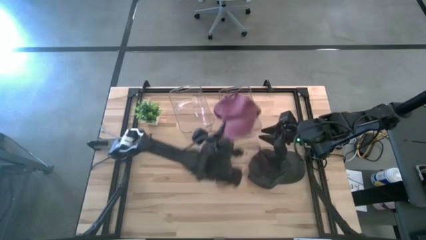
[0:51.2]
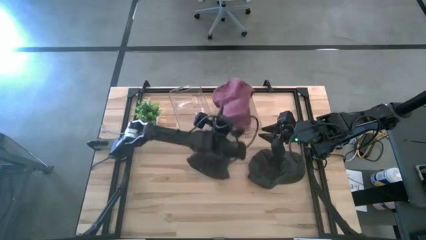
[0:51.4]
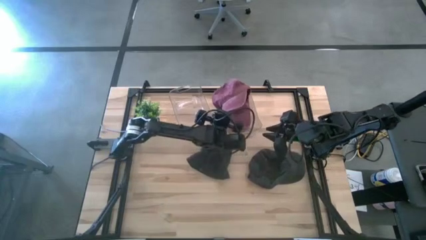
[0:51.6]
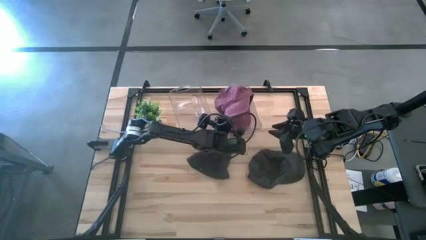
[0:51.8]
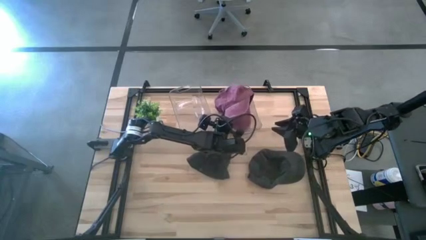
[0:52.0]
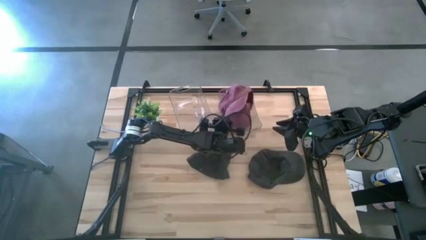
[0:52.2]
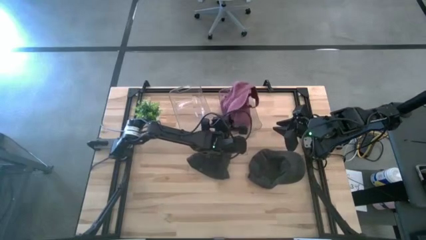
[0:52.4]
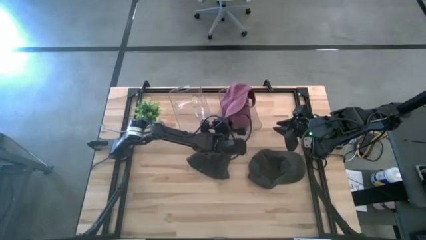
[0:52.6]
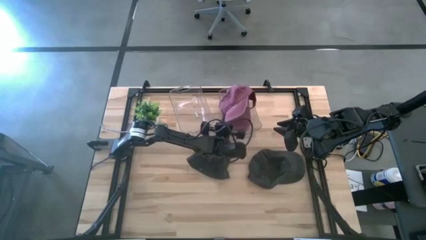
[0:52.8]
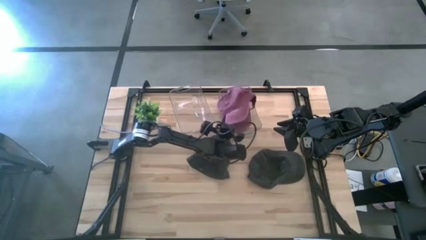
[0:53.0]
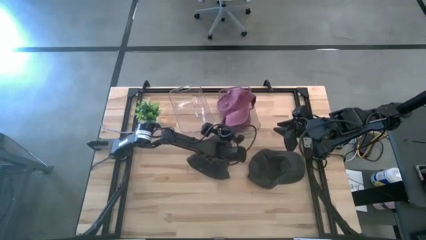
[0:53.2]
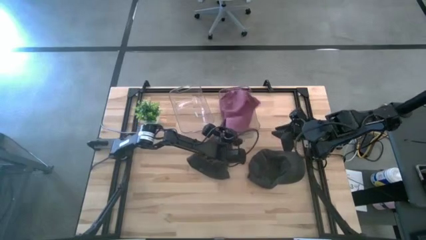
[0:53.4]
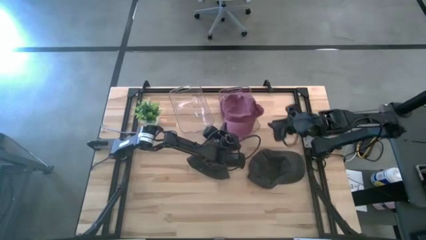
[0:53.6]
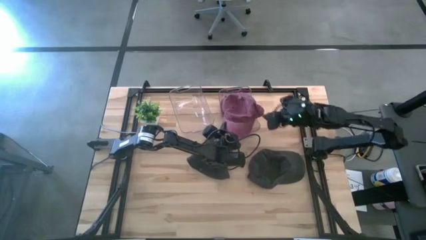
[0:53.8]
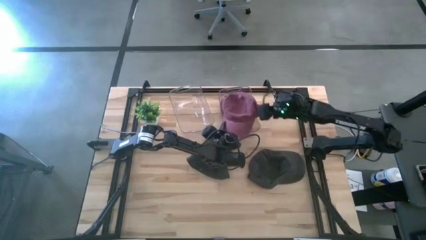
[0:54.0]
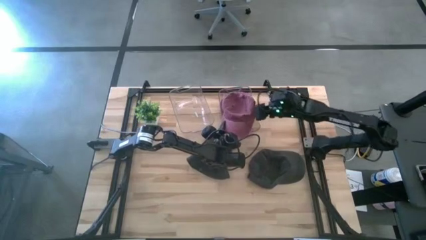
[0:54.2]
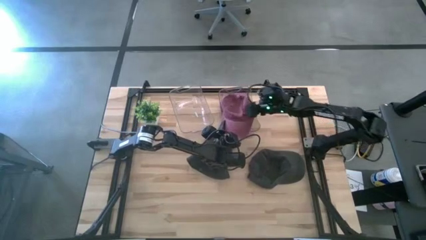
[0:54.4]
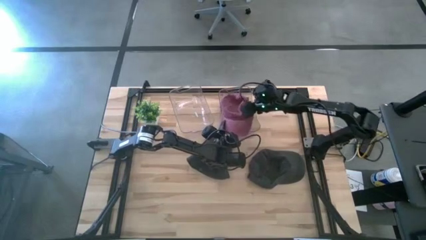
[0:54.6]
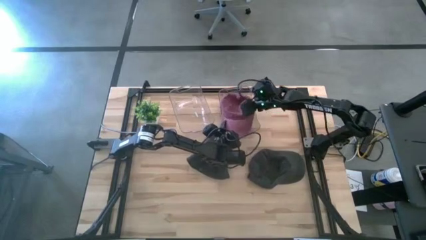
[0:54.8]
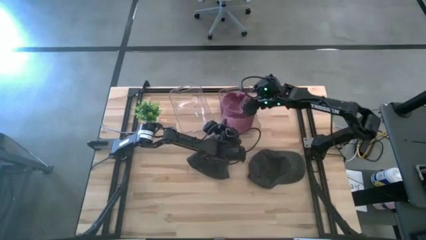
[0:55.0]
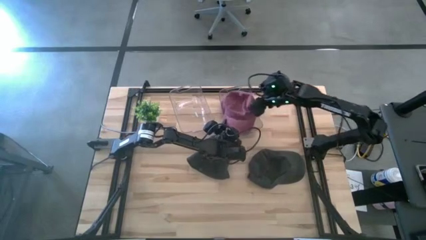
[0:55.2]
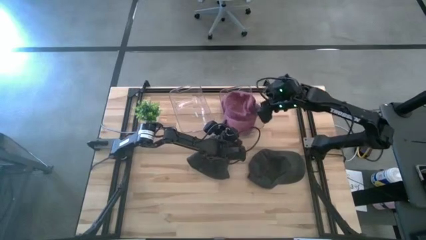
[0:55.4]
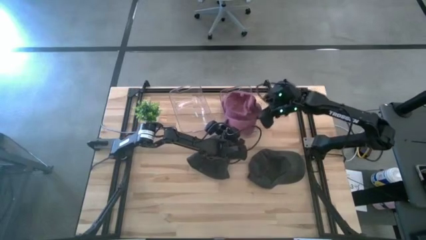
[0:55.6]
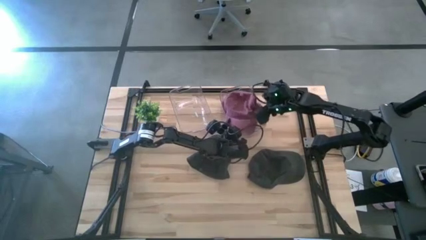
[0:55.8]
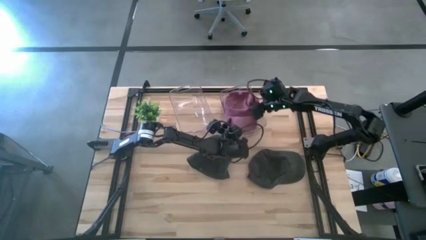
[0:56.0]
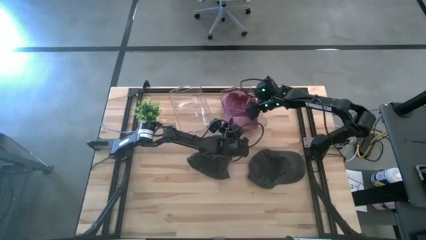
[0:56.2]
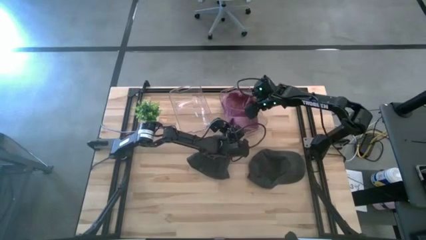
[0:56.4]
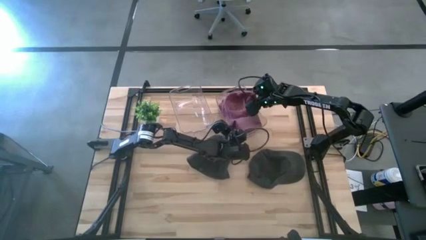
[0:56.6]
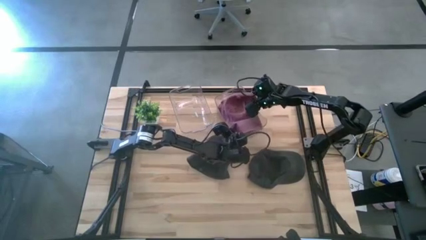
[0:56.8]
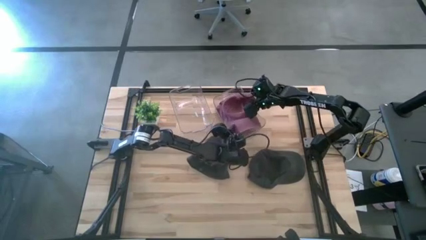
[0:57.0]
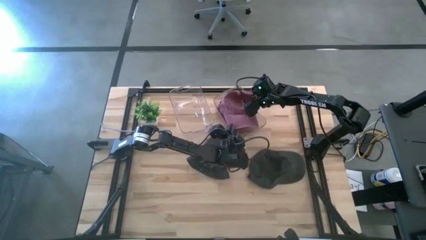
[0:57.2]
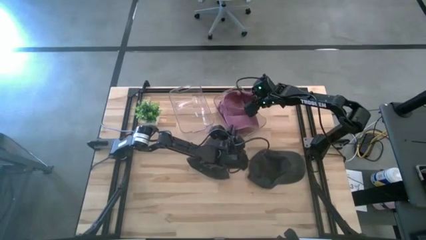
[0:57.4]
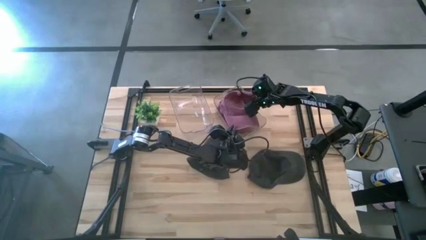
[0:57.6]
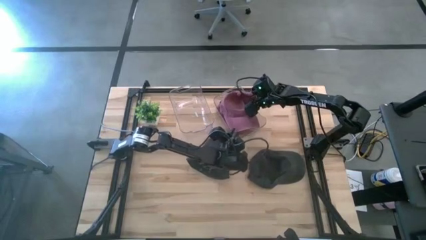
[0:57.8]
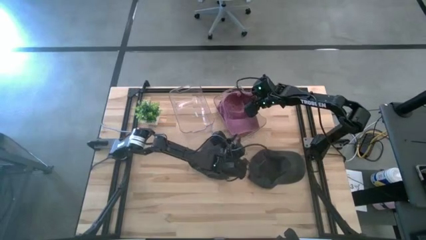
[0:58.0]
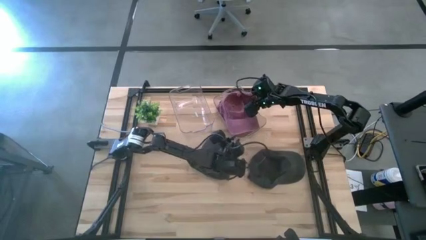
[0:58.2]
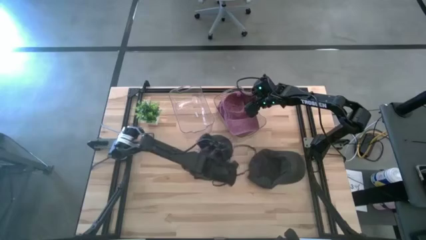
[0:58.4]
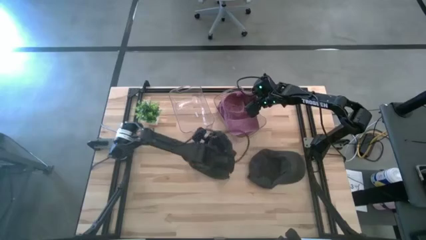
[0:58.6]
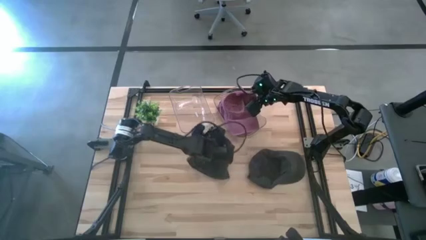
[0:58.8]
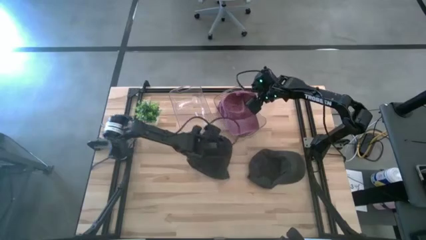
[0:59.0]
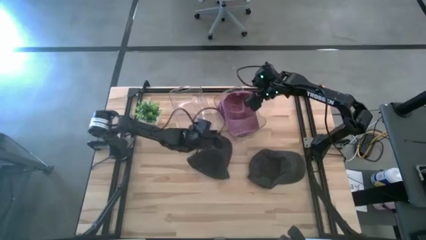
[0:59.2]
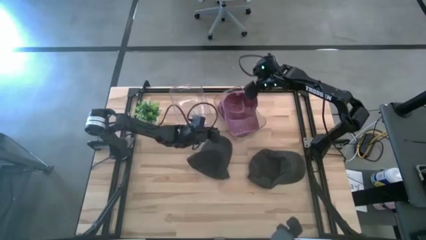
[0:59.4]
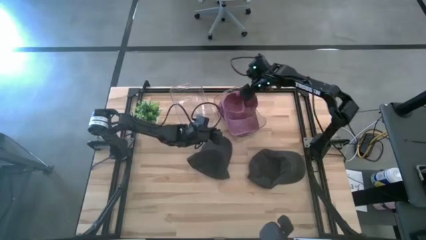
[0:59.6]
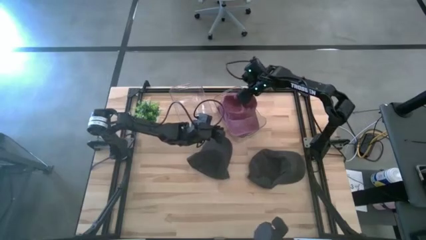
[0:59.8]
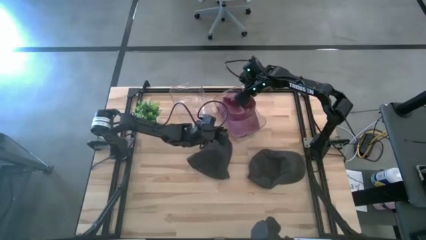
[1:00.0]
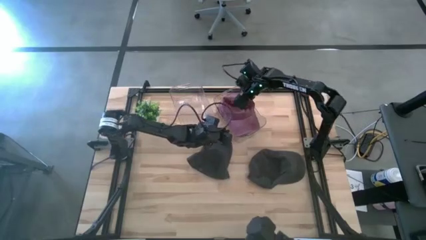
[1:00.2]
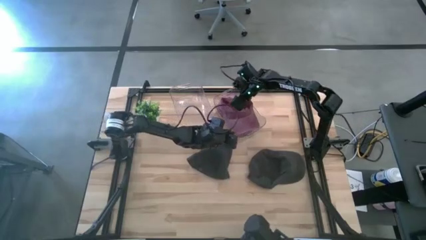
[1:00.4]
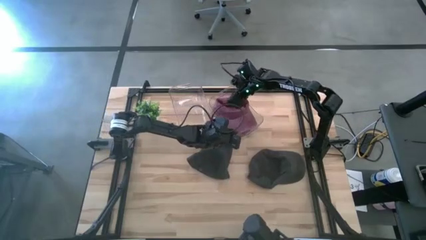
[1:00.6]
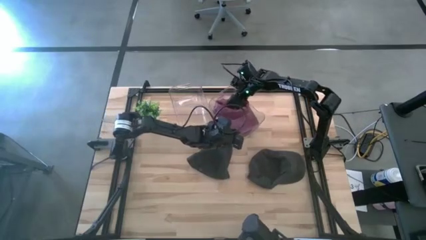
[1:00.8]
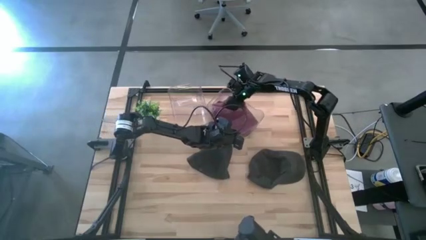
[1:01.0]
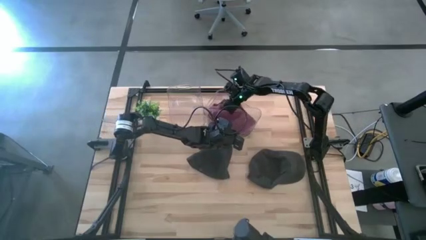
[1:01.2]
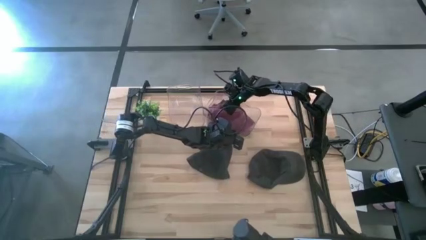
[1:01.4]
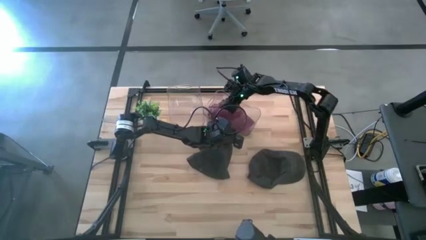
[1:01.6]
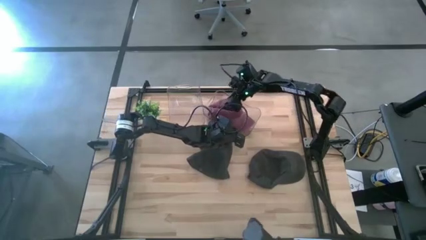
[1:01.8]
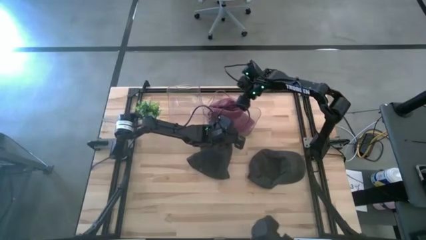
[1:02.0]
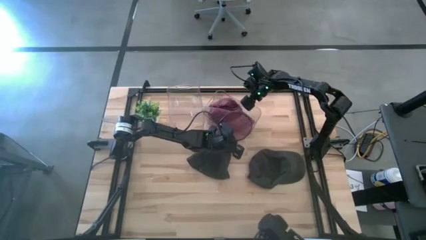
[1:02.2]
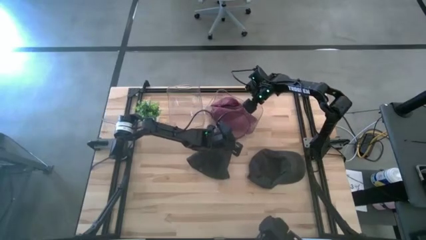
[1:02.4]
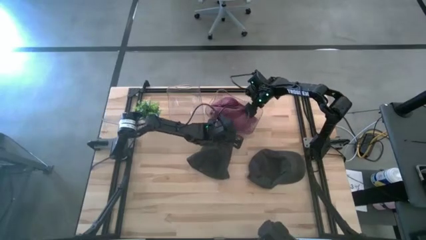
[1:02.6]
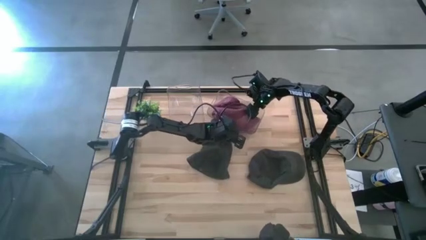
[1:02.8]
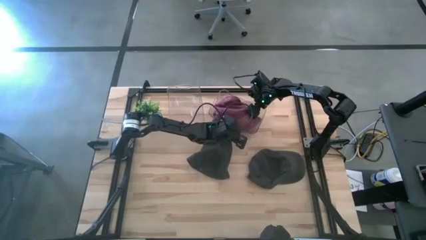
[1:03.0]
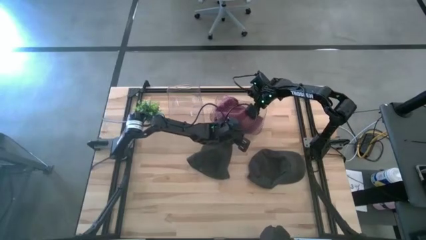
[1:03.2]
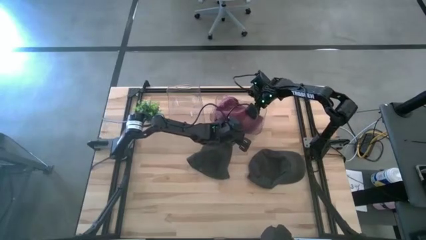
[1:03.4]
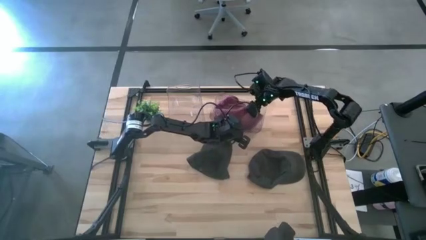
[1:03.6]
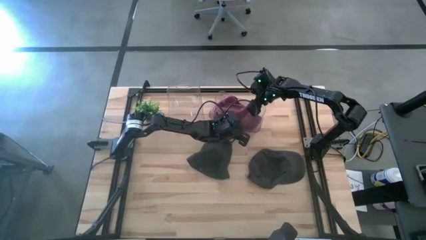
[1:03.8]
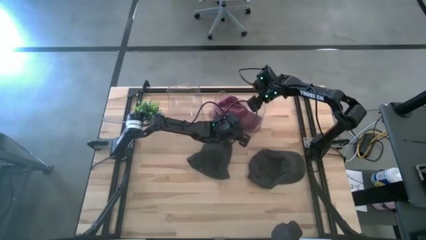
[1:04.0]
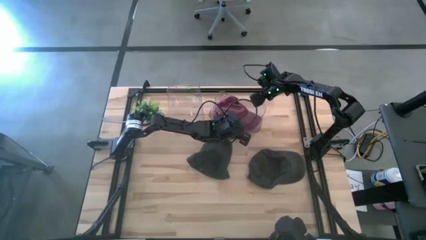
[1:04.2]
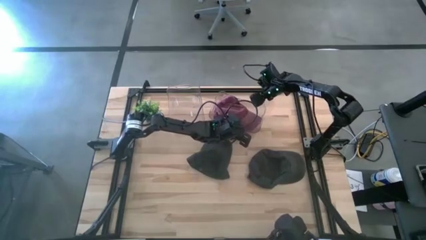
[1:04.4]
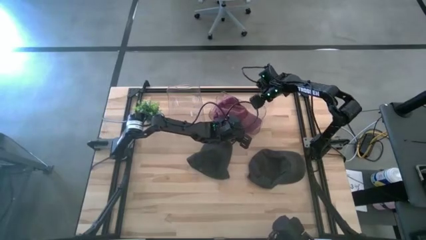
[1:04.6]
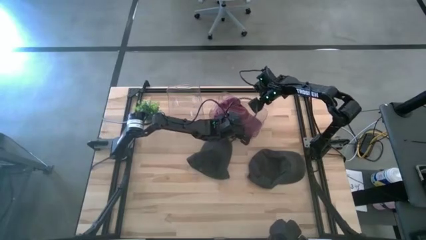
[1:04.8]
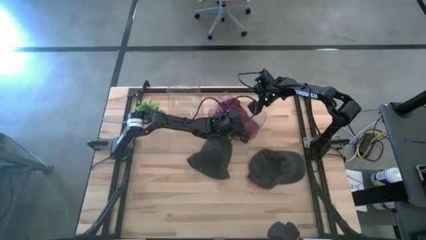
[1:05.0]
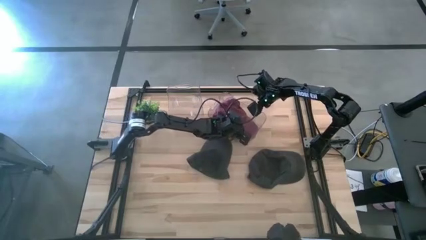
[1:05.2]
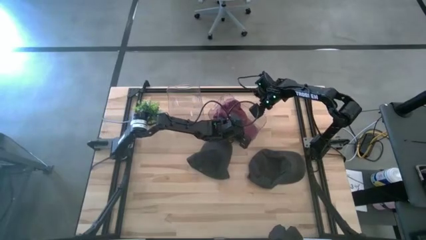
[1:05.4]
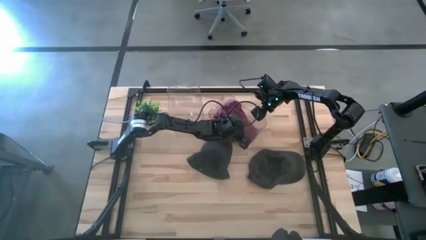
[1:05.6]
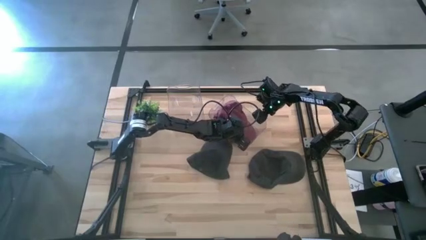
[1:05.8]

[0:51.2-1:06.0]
Task: Pick & Place hat
Put the red cap into the right transparent bin

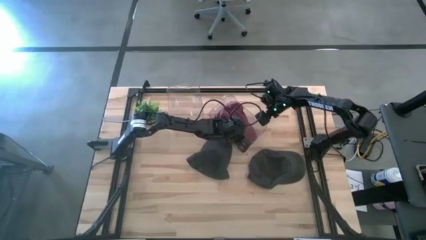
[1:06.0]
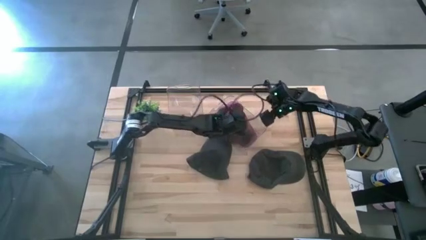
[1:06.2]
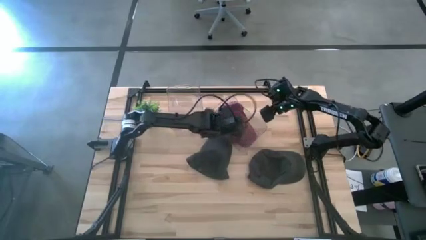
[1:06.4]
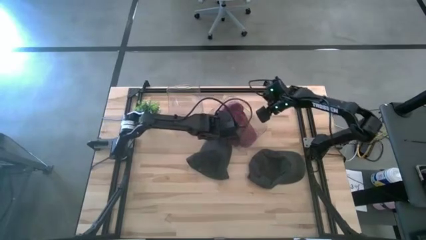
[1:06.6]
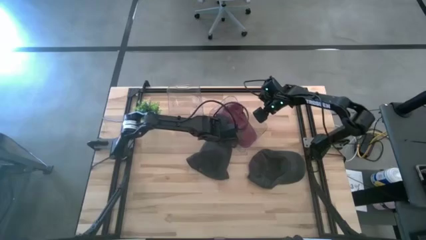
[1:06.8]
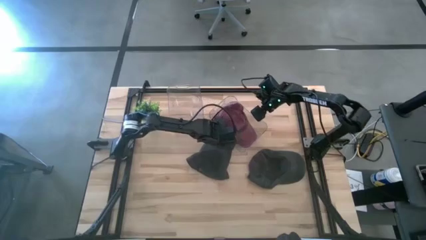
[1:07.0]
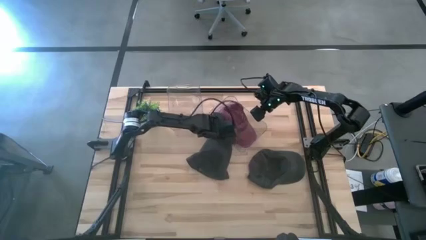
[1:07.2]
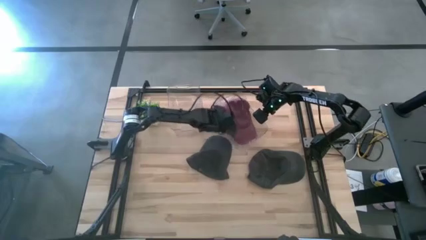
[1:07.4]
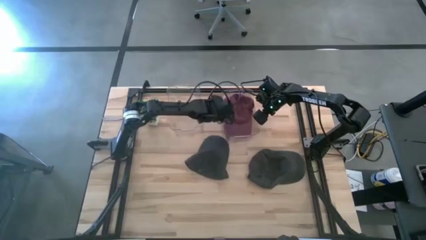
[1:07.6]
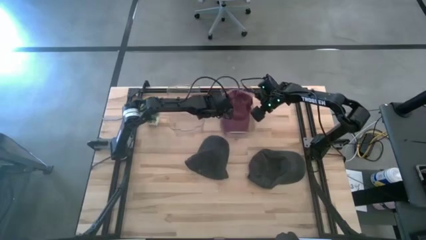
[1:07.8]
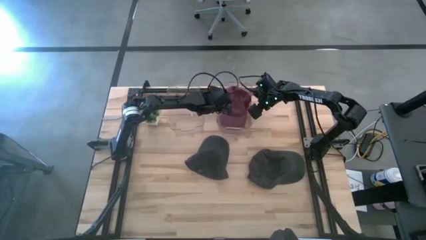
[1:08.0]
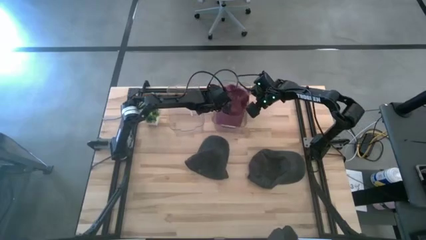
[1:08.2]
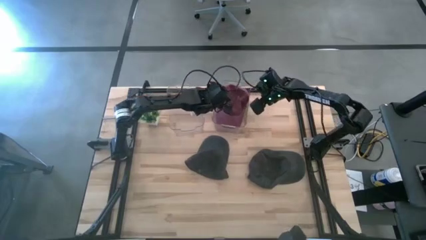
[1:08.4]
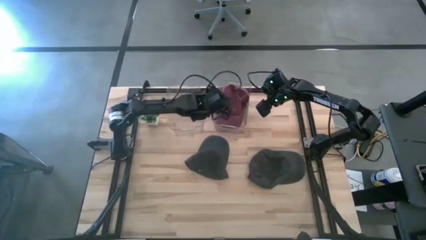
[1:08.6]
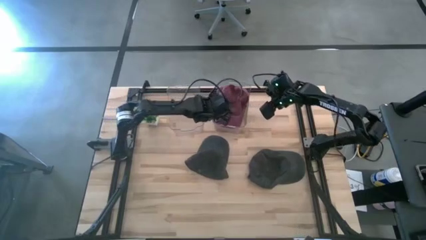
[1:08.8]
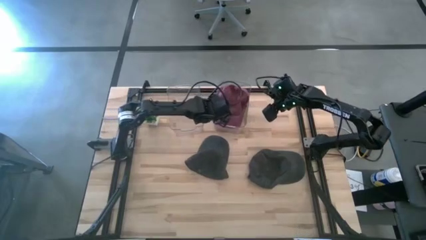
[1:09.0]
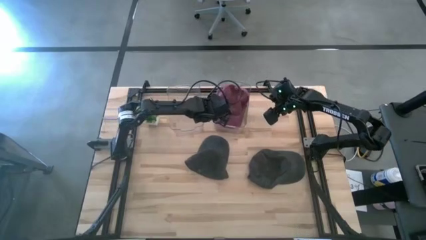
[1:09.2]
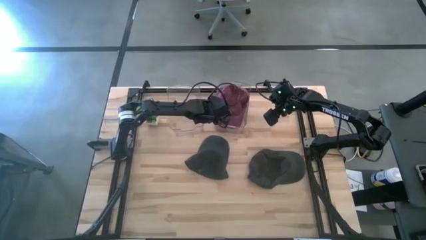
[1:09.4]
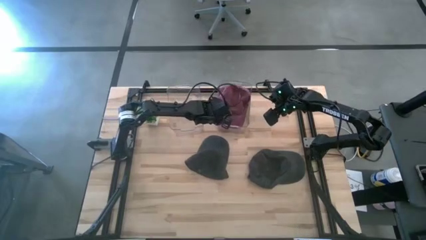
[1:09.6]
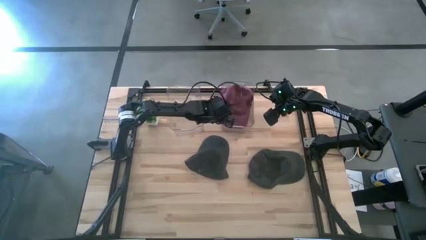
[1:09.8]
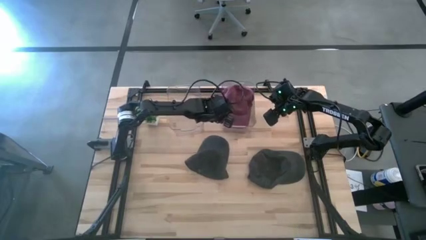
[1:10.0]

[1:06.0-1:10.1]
Adjust the right transparent bin on the table
